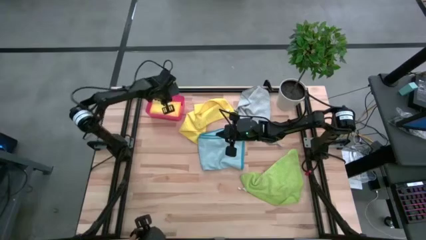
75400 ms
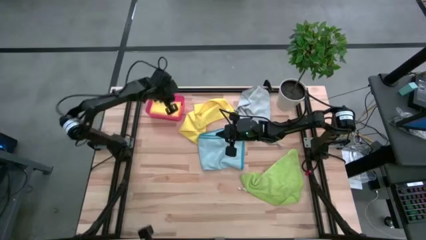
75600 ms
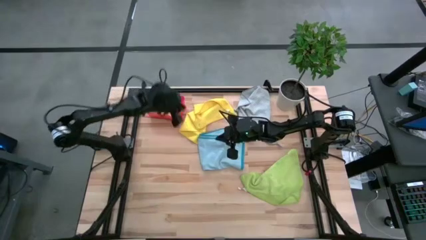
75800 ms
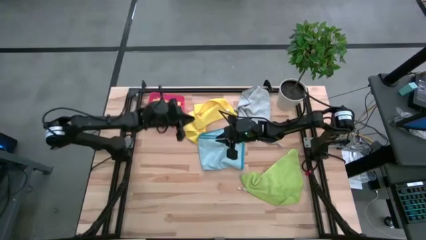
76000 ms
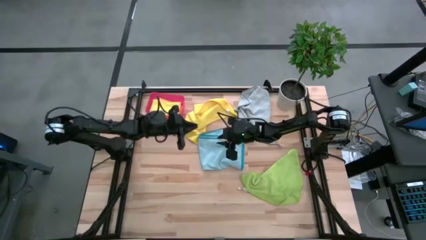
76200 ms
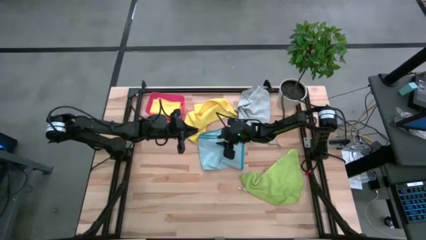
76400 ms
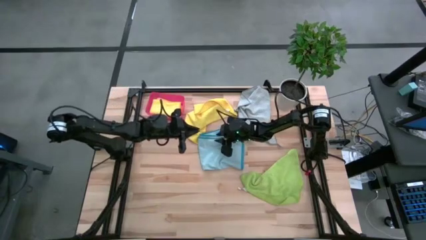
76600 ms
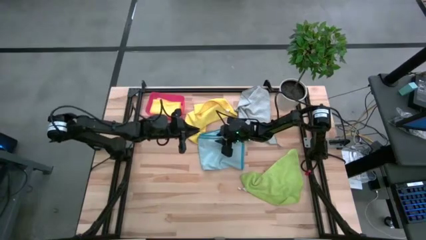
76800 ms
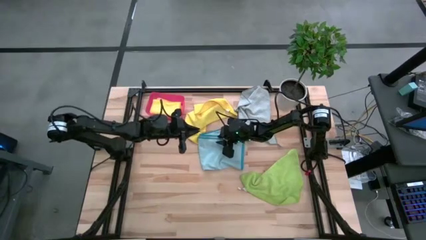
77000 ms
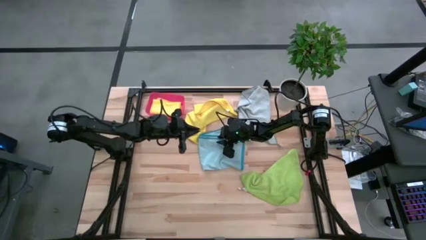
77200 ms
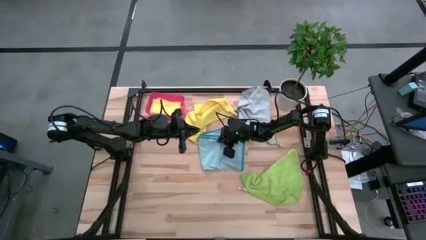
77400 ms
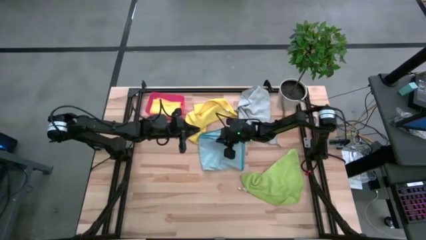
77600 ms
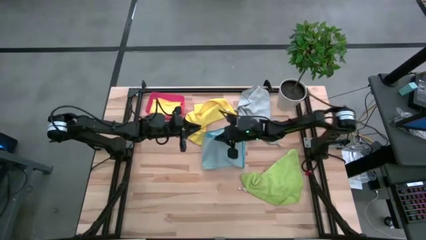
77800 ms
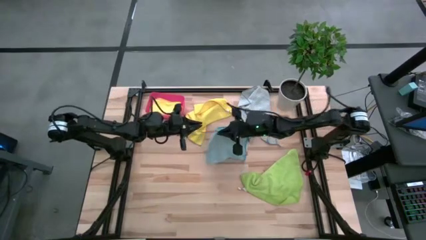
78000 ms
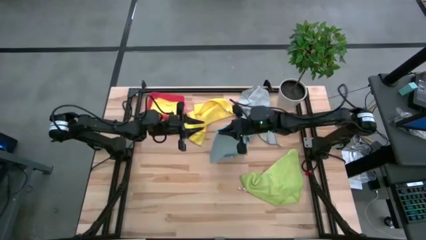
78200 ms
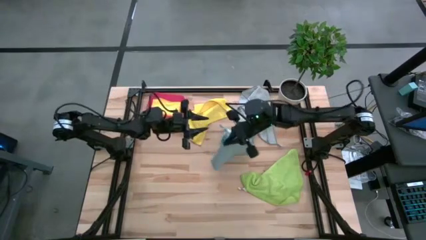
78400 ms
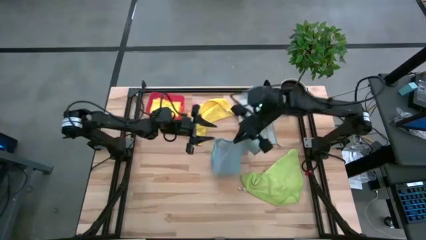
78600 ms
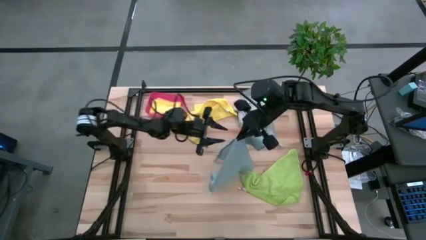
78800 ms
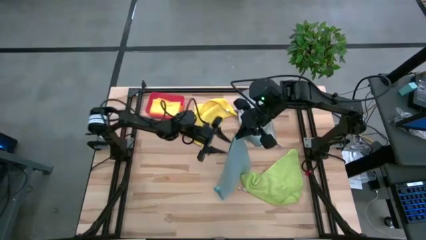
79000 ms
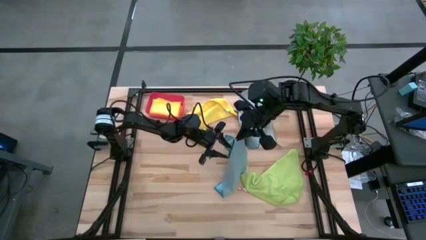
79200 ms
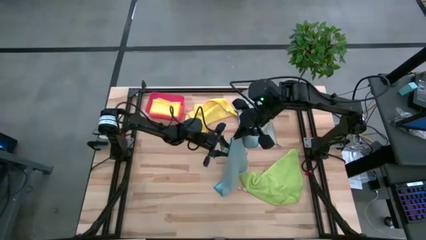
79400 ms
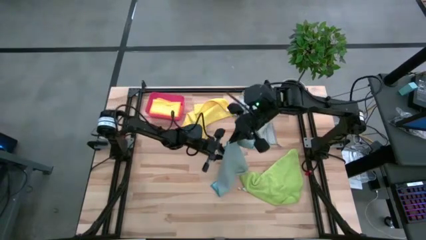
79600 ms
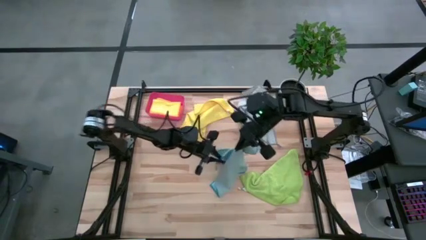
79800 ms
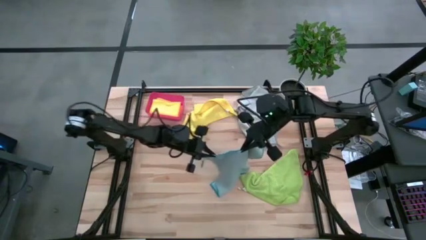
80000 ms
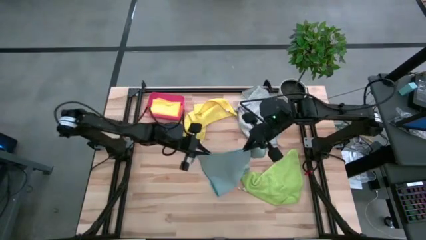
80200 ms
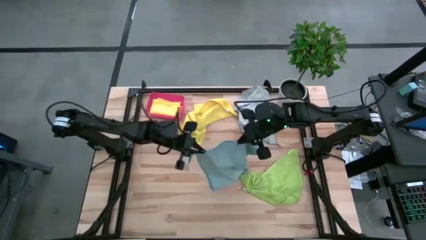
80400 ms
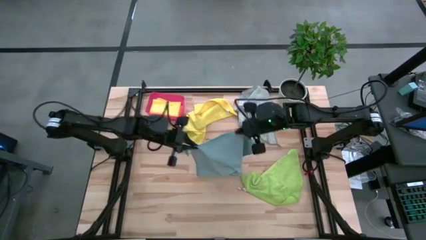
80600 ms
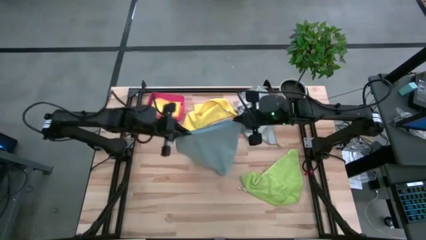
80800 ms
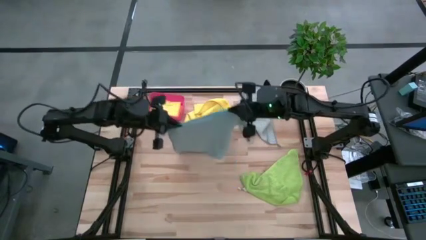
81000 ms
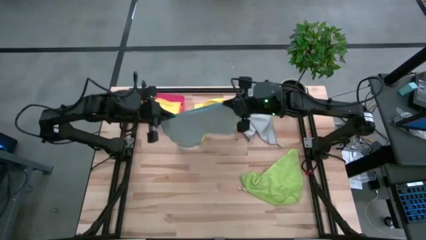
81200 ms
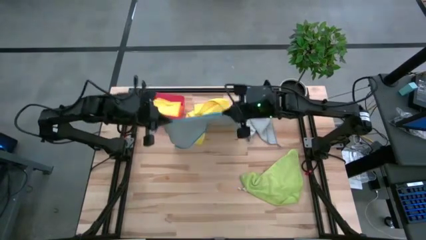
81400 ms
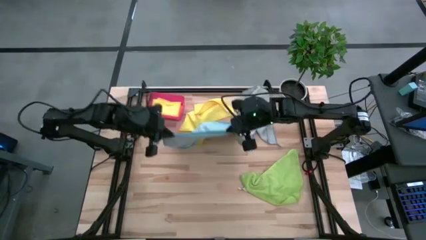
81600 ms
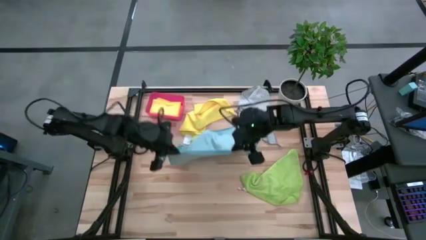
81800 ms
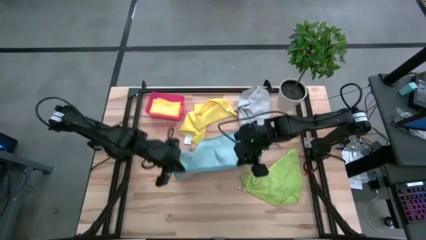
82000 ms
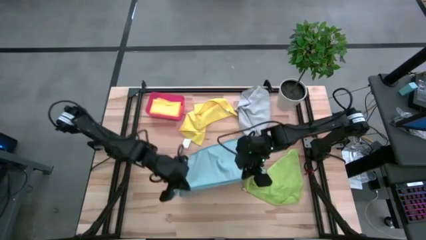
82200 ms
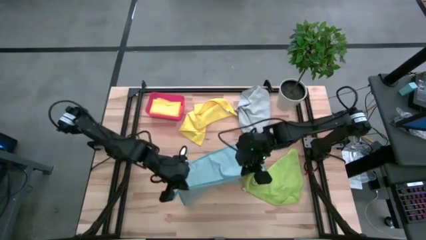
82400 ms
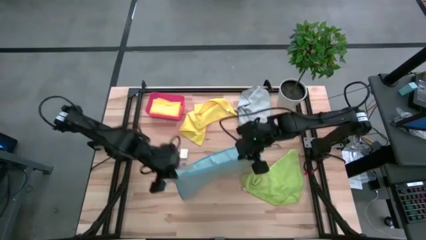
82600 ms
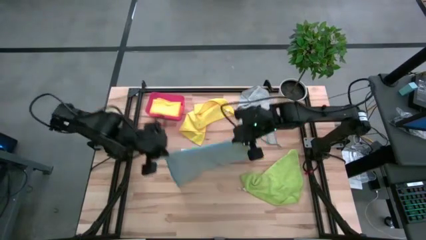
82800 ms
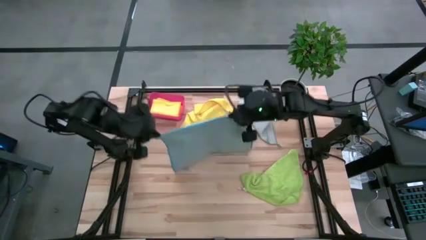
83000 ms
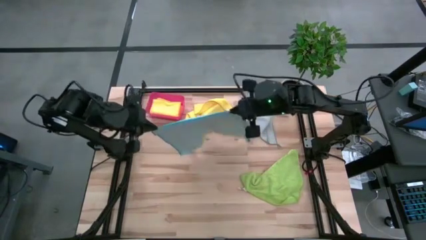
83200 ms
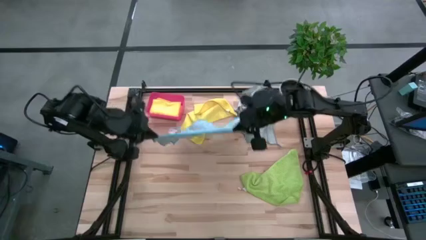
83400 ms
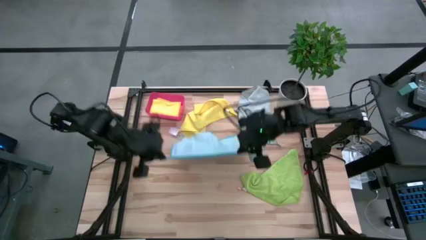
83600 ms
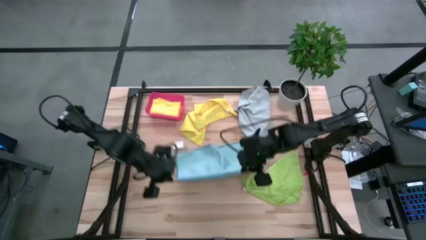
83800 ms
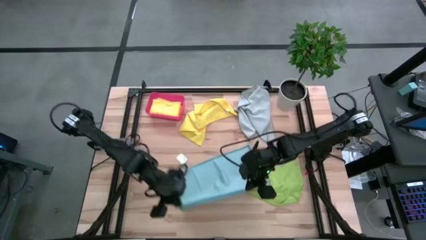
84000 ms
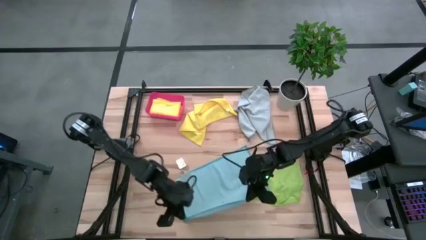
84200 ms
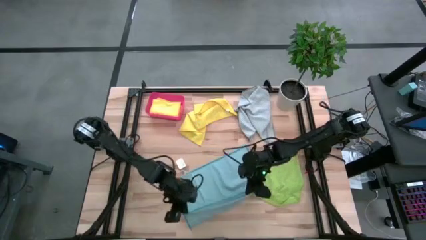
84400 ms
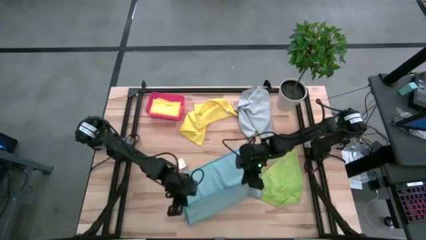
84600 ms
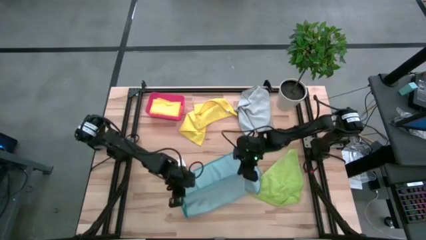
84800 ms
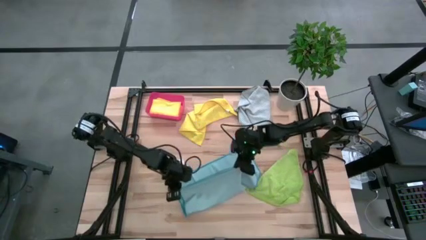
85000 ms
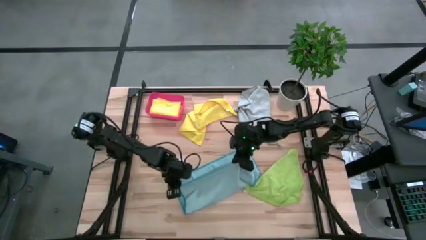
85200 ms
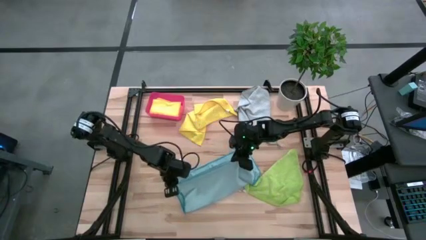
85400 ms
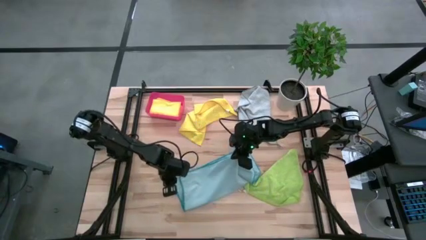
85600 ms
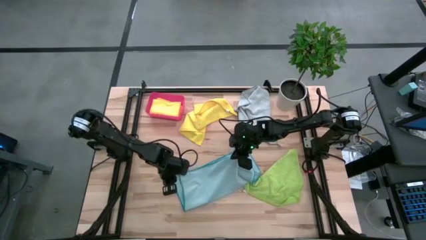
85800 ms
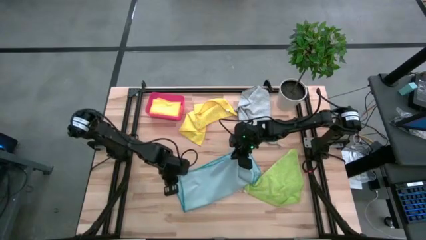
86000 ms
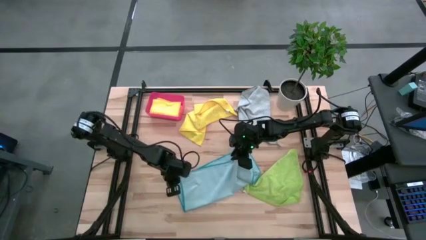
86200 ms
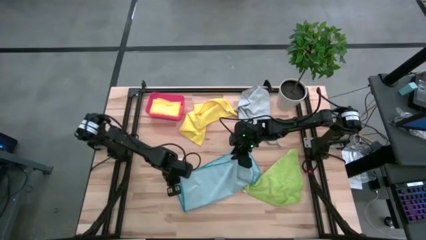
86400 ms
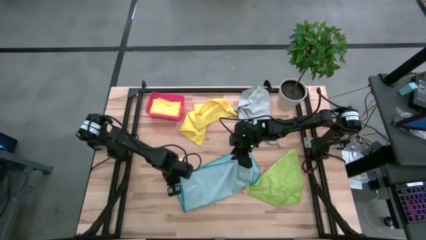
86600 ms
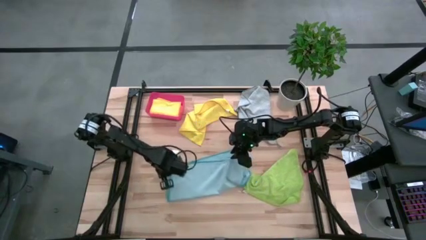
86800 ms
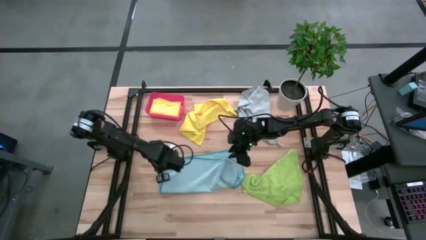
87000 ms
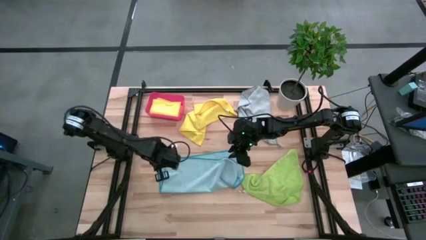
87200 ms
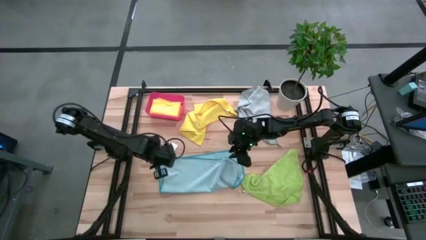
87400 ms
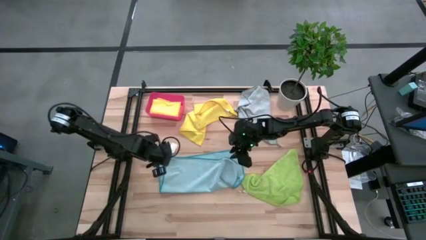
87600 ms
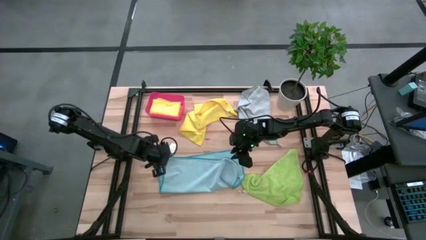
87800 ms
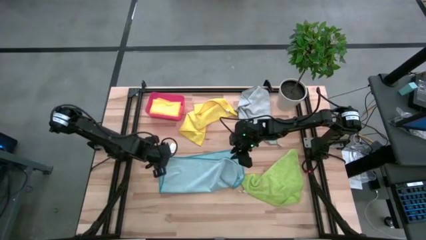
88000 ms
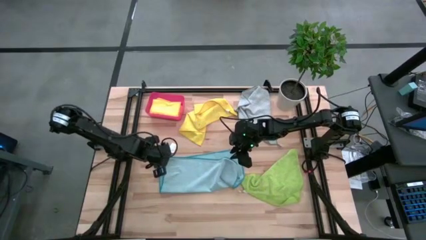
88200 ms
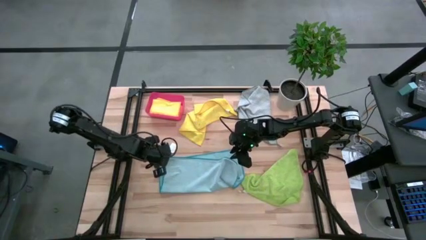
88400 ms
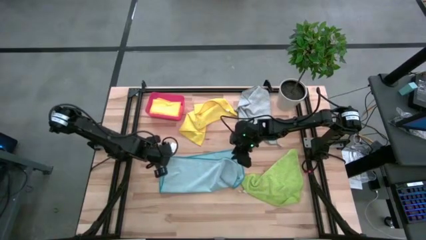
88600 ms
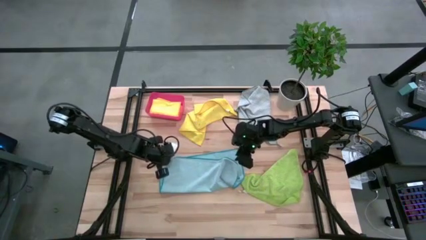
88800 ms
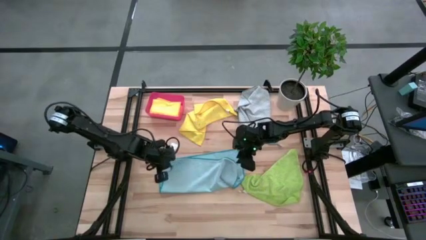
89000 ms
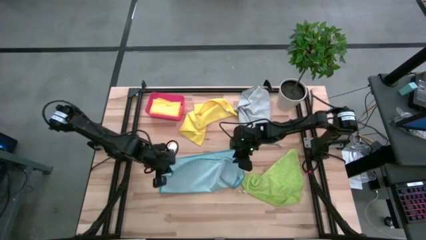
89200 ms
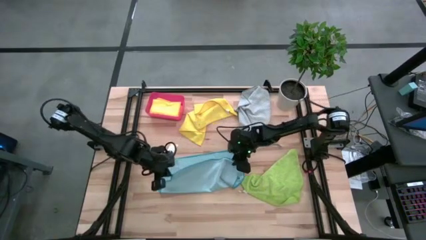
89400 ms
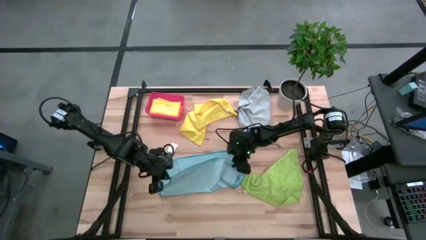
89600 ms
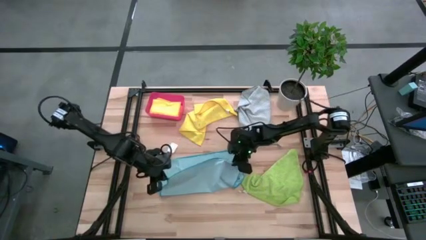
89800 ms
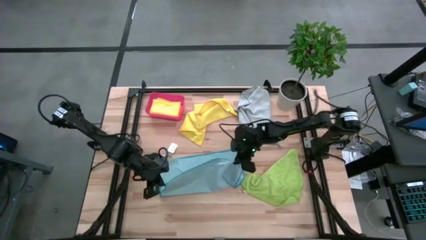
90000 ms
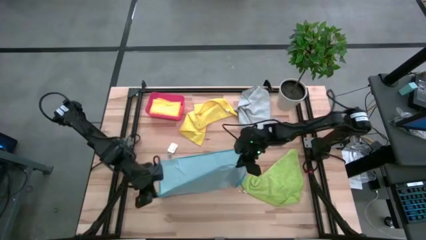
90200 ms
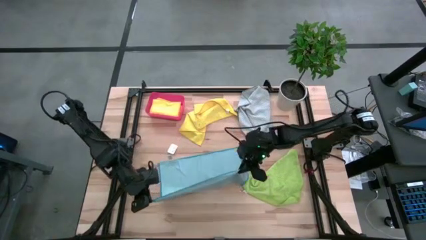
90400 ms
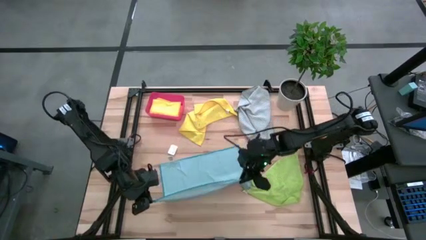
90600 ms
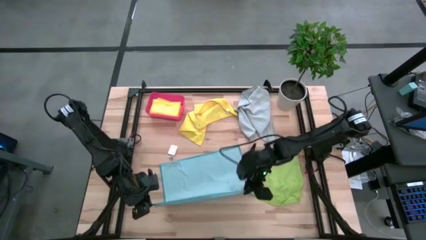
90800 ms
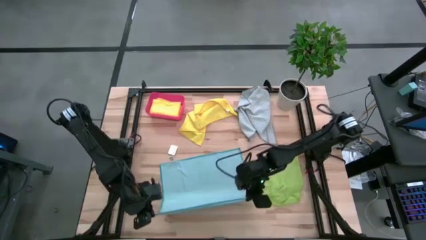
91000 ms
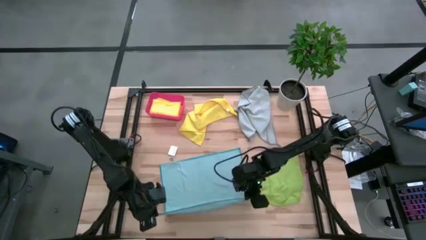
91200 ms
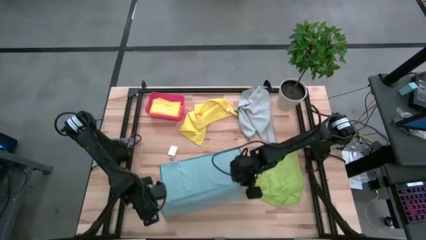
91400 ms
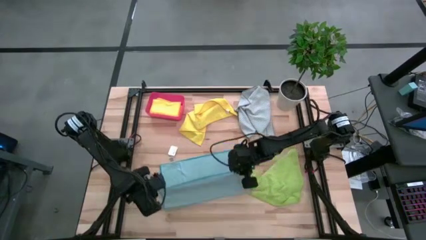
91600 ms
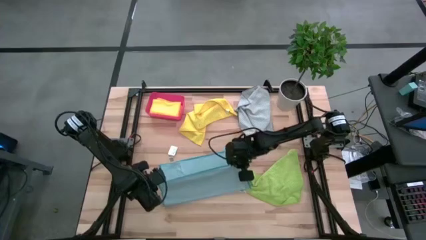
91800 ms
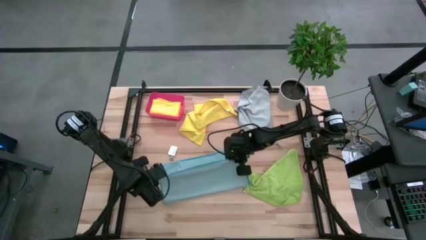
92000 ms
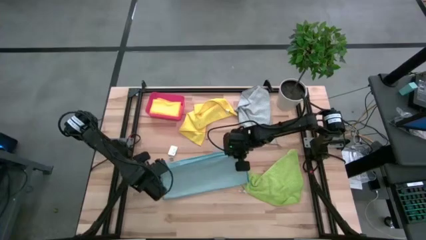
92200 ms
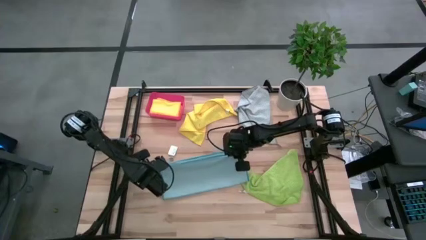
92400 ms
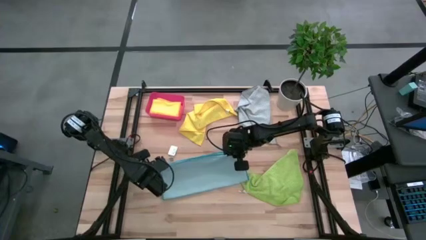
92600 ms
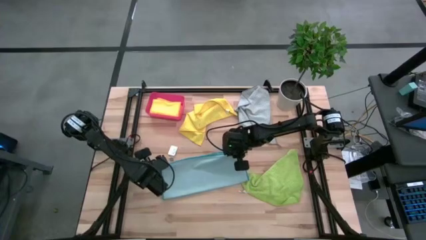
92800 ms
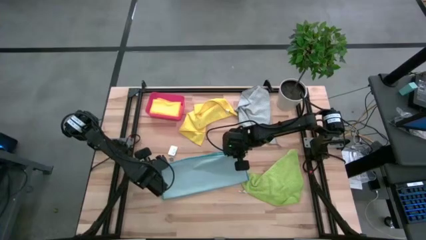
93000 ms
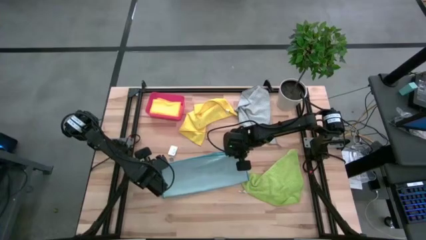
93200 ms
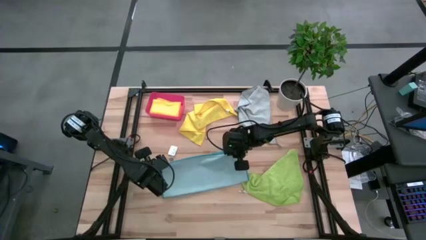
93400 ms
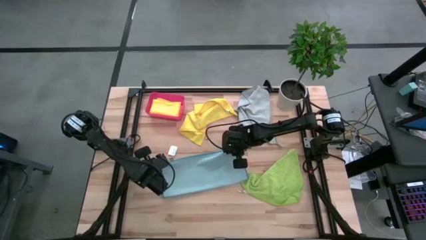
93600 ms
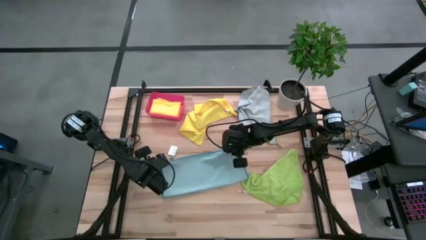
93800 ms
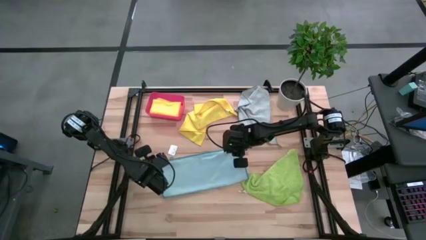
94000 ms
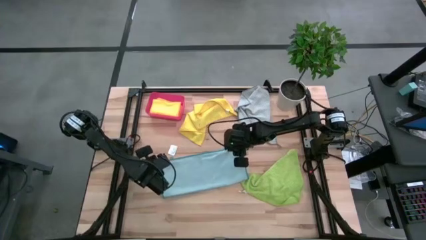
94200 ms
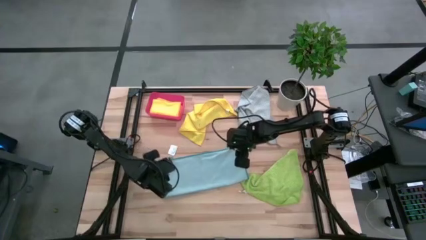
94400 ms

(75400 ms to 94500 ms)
Task: Fold microfiber towels
Fold the light blue microfiber cloth
